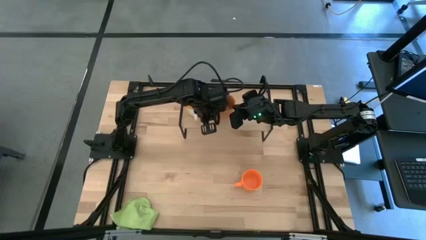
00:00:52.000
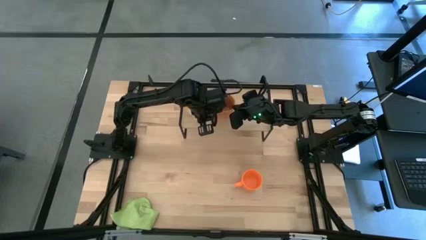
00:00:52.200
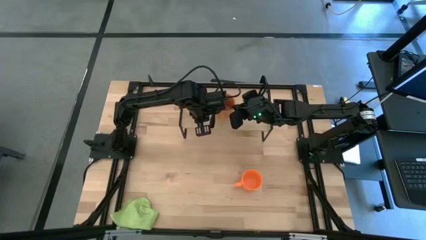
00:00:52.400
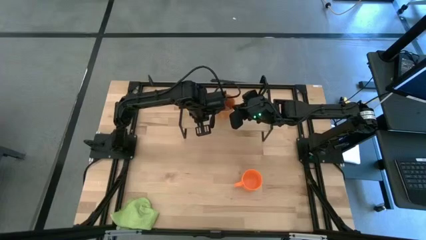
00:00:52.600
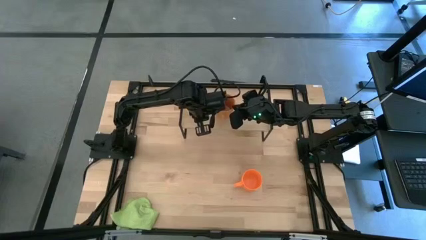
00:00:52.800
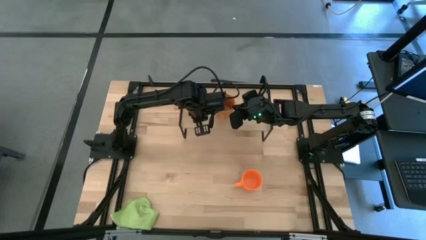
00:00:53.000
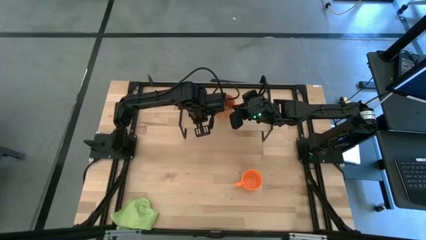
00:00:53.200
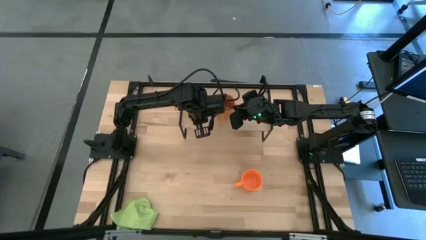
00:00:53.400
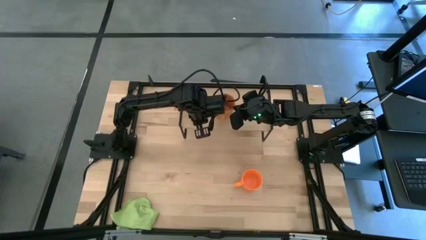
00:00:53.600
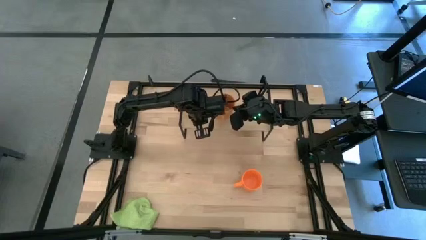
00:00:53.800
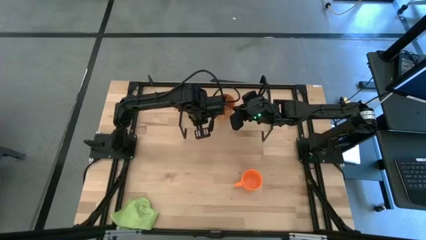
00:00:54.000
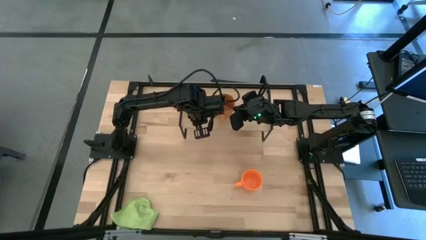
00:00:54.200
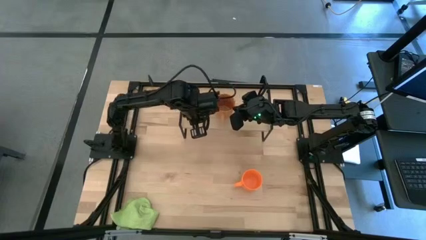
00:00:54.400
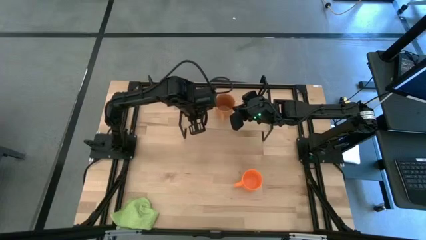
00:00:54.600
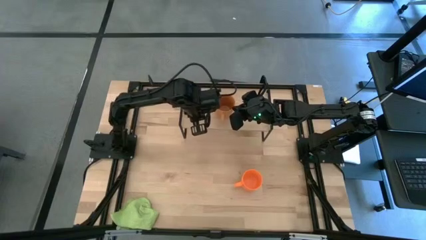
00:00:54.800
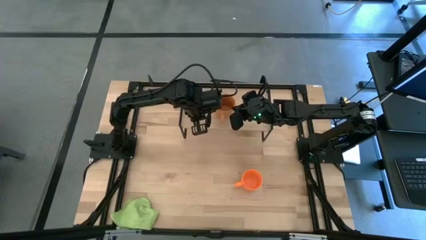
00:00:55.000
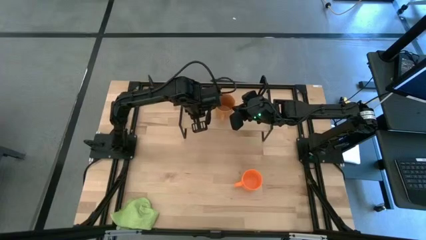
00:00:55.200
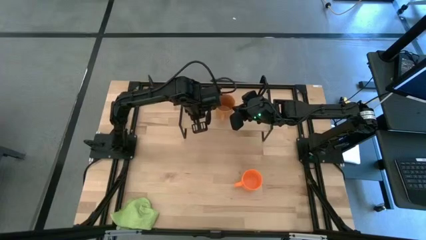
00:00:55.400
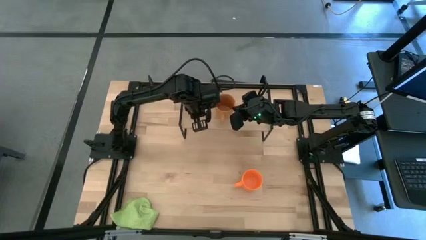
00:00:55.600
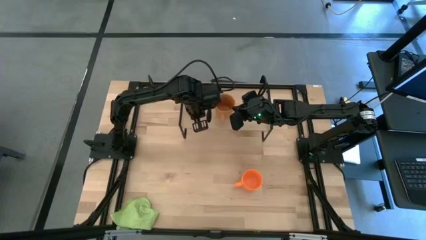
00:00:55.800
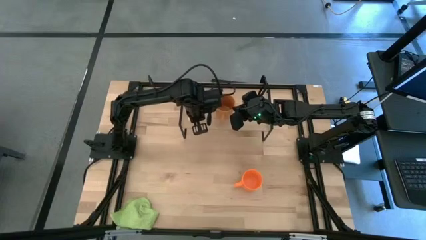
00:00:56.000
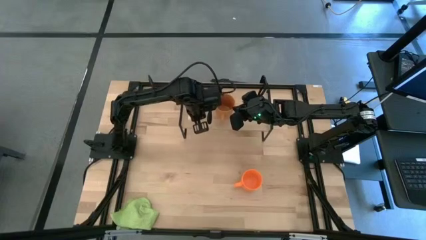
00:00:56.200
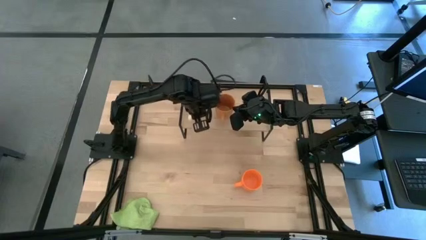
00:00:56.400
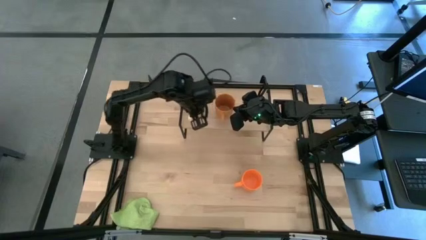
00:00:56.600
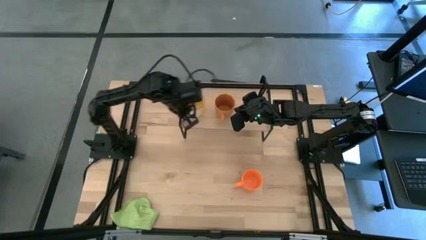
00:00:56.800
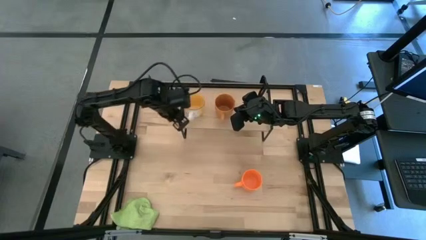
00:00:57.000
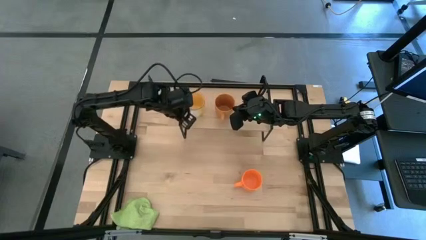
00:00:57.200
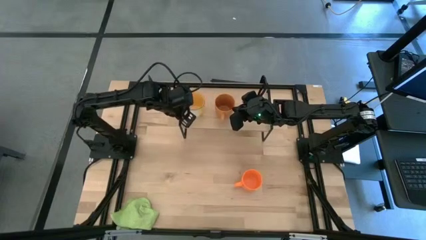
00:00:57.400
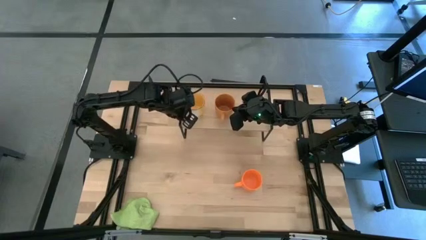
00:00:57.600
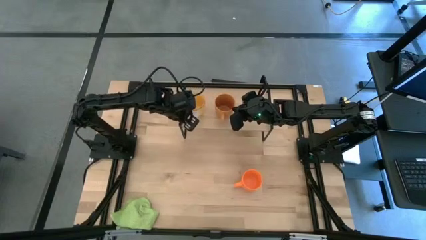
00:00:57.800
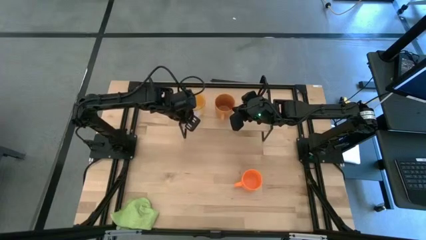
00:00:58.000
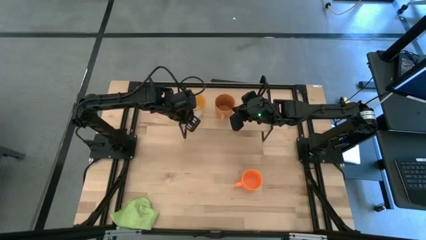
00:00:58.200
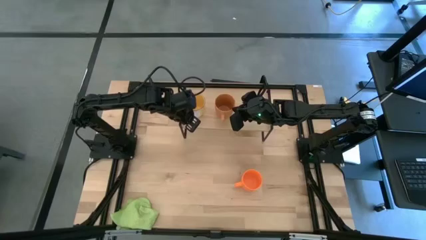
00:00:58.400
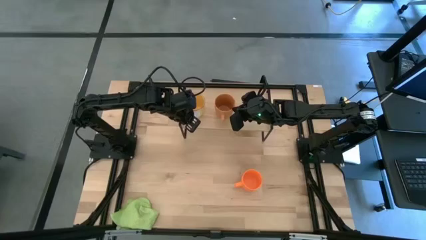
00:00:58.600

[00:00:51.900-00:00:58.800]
Task: Stack small to large cups/mugs on shelf
Adjust the yellow mug on the shelf

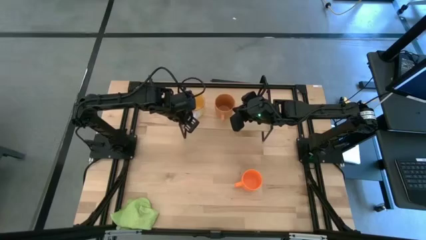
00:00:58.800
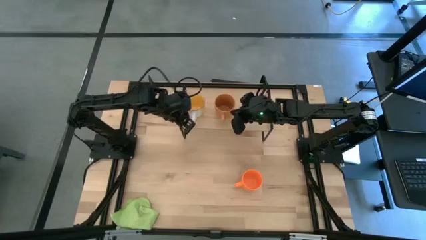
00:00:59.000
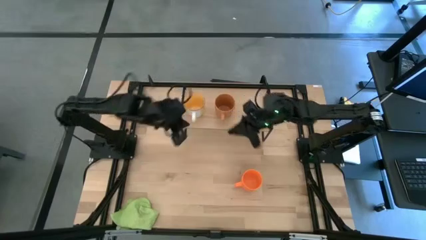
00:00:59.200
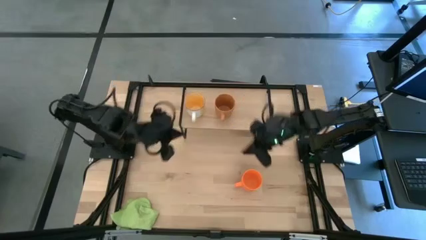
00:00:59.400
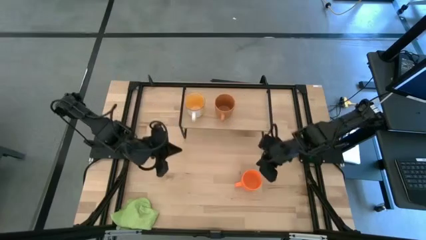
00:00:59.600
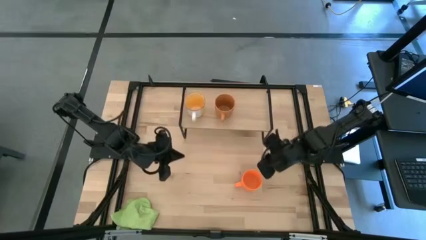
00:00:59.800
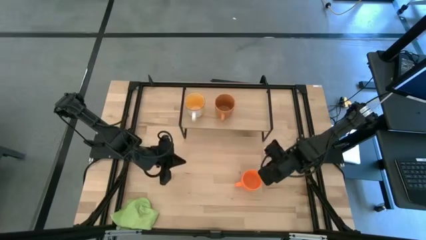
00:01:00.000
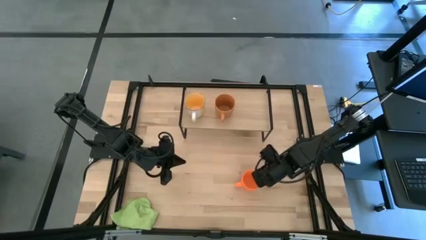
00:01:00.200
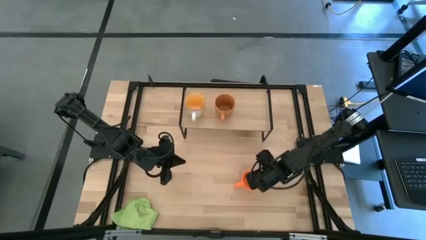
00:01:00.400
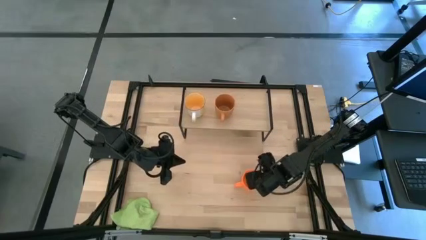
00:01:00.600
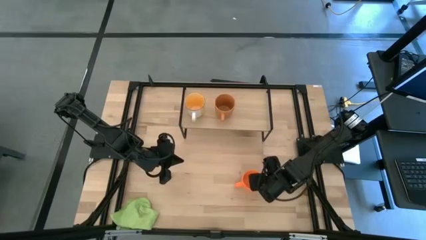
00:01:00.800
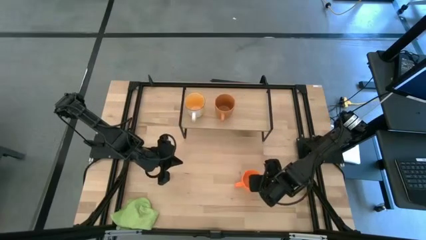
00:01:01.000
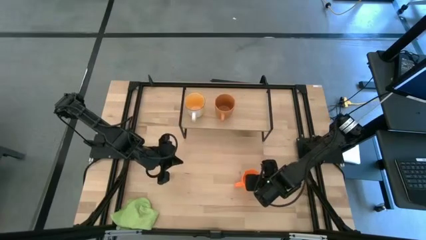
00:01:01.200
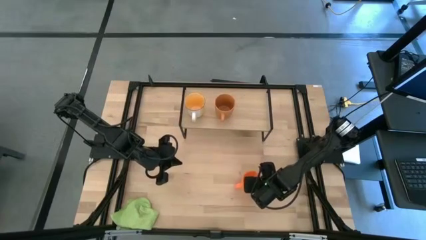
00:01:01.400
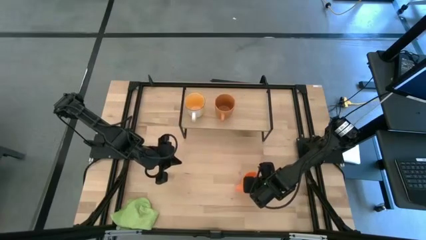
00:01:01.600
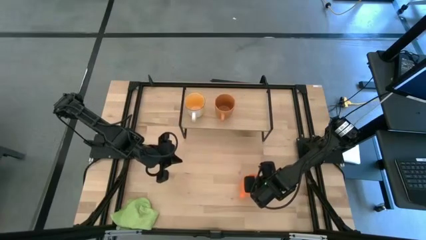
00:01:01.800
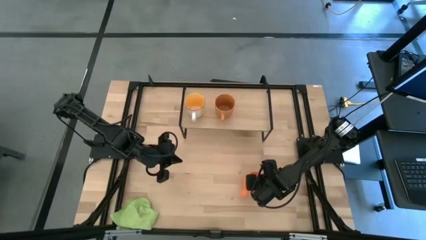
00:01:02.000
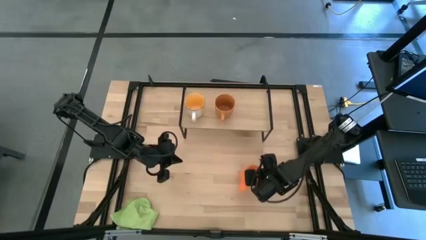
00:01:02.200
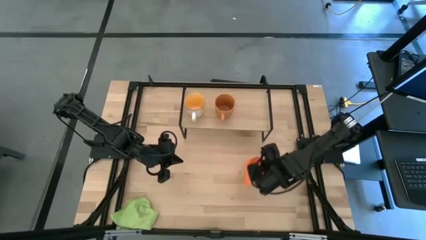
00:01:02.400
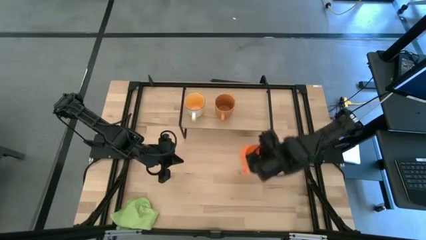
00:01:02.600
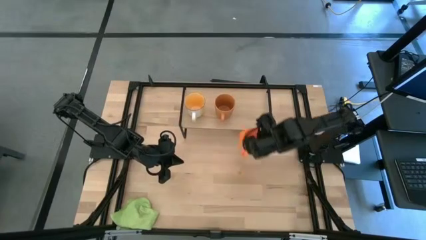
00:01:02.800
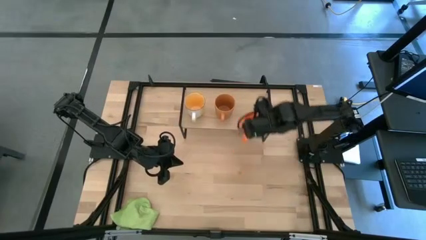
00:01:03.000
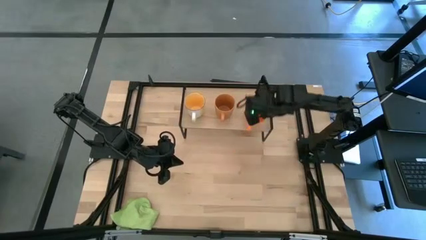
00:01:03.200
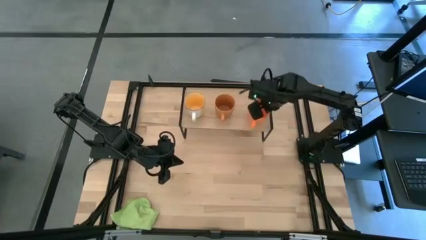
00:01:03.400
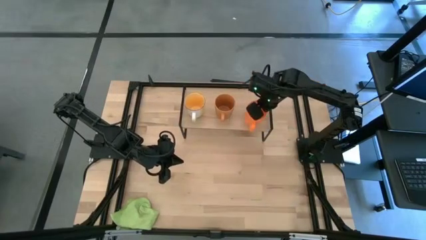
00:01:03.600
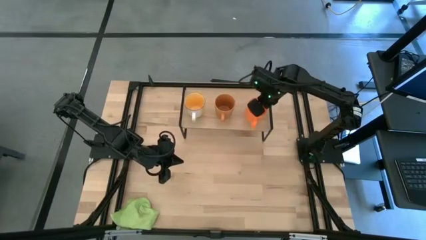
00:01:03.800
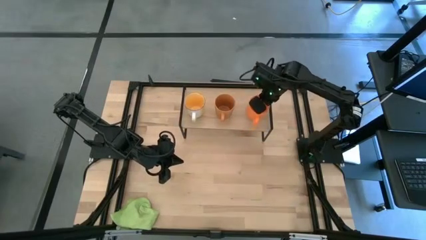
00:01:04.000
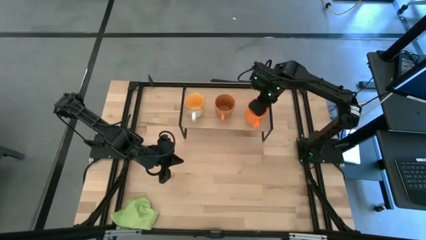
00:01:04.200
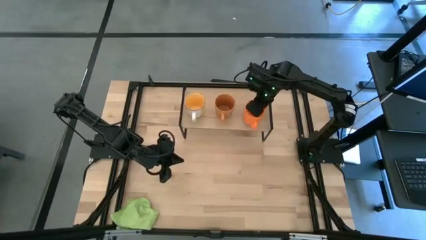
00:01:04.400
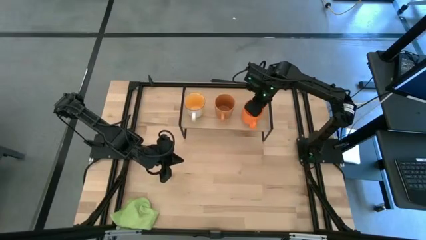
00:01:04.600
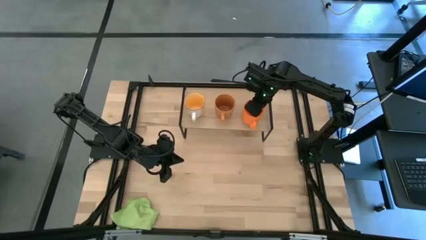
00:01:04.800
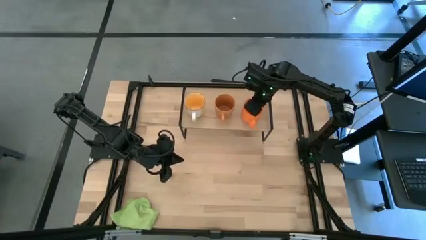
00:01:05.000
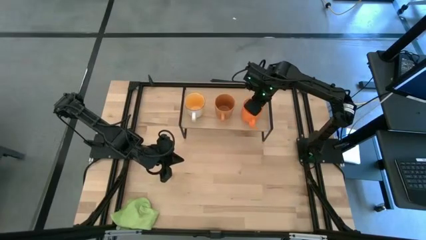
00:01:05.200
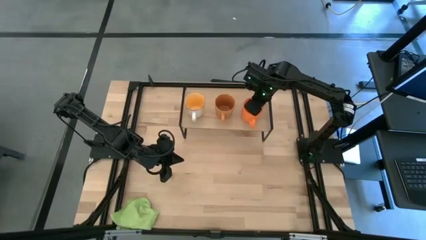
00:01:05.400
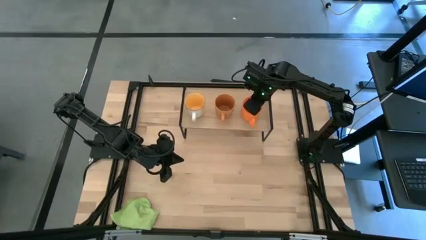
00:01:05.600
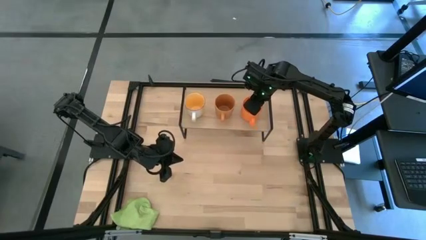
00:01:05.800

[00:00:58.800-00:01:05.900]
Put the orange mug on the shelf

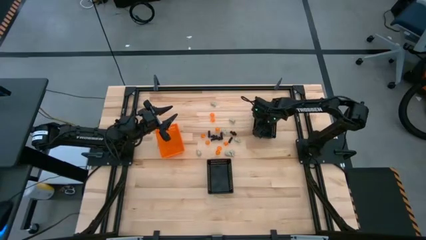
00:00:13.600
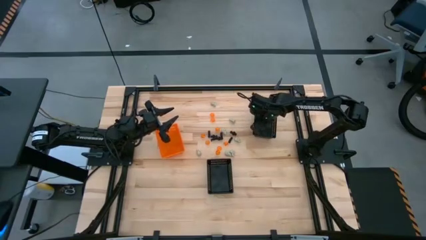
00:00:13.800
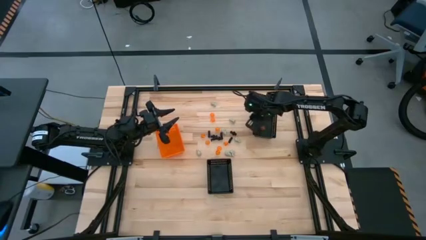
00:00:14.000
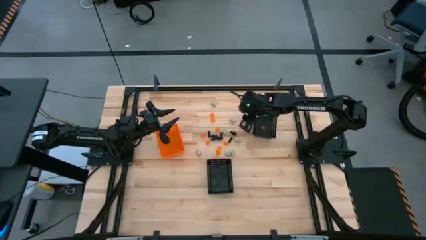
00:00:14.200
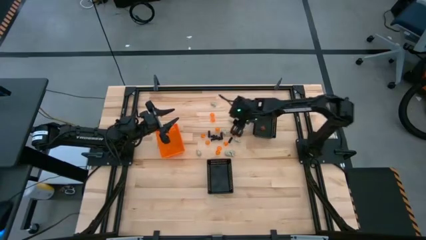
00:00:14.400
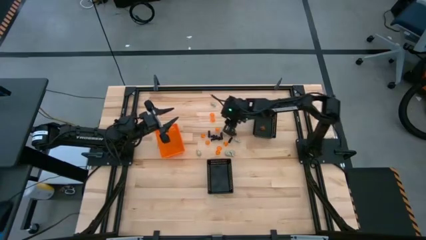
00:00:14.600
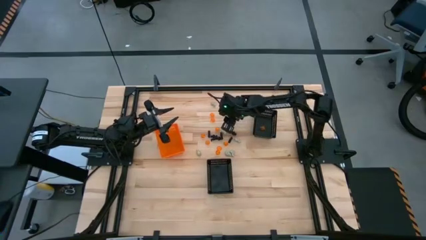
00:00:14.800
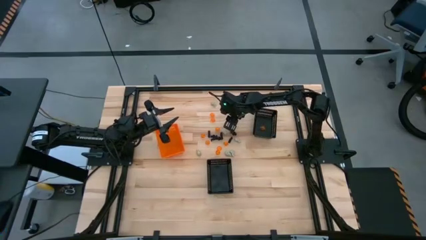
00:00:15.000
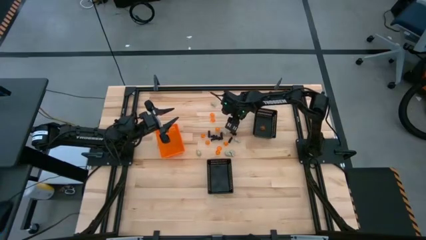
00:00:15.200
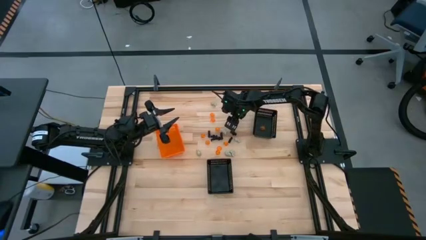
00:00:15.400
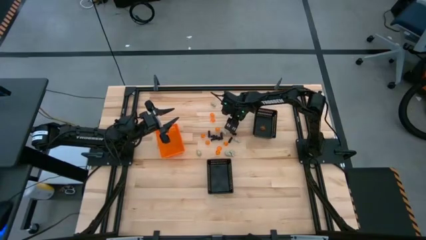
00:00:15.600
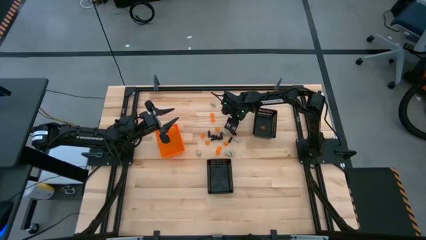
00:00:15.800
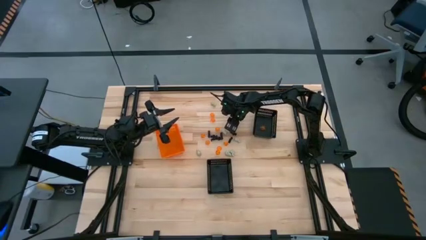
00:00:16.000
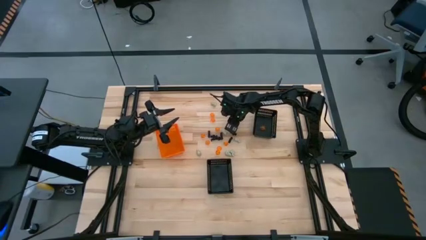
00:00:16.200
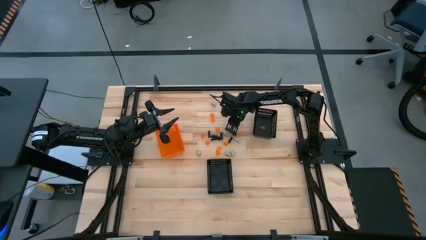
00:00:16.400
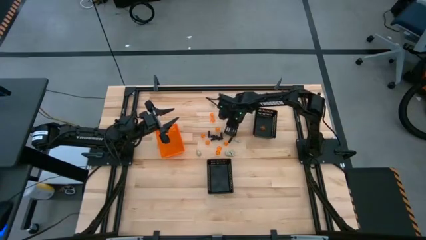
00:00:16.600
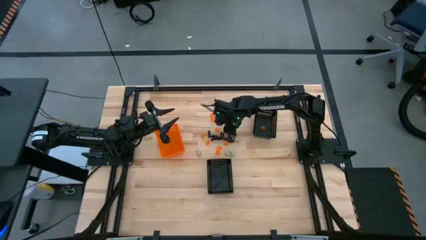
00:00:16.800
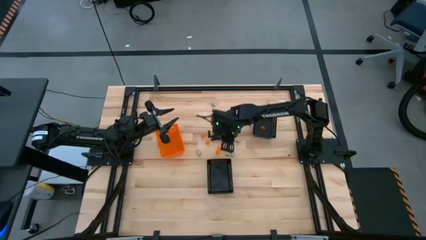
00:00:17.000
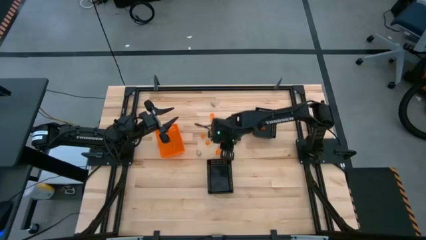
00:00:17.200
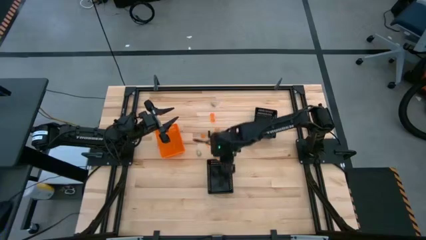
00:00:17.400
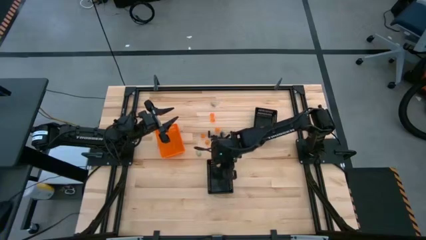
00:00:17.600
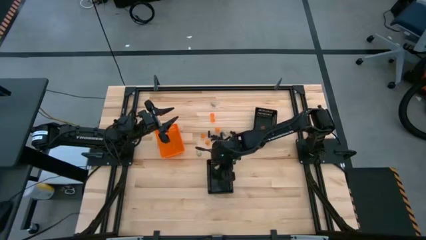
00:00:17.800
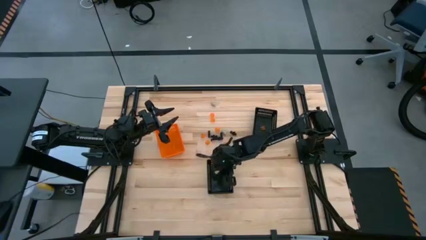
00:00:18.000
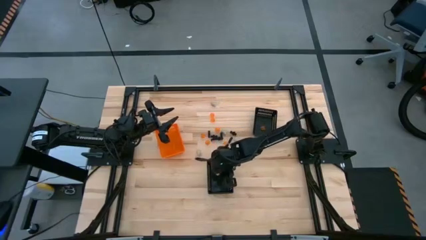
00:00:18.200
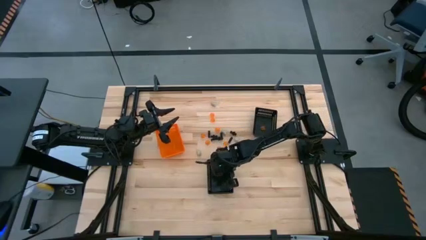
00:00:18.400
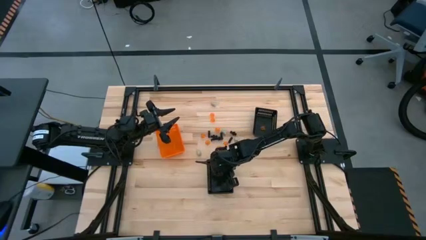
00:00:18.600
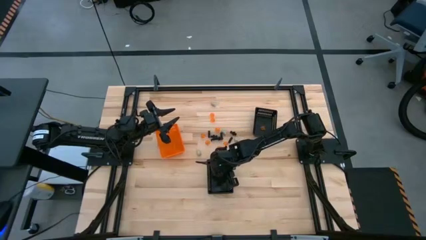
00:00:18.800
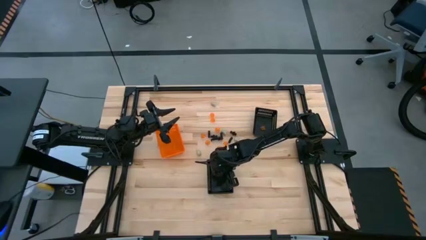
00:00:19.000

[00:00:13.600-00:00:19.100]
Task: Sort Halloween decoration
Put the white skull toy into the bottom black bin
